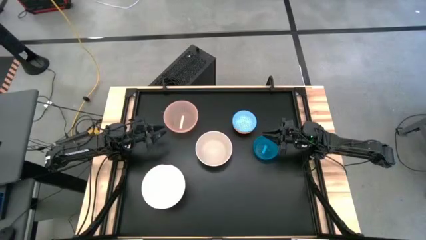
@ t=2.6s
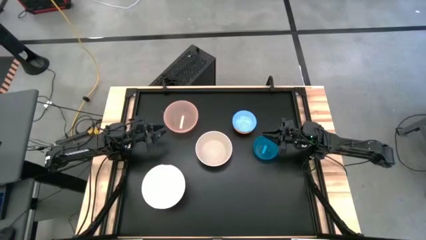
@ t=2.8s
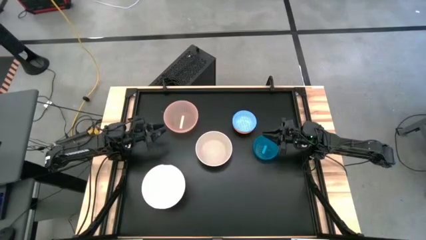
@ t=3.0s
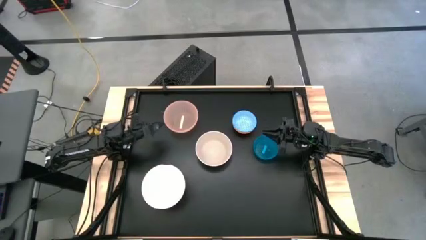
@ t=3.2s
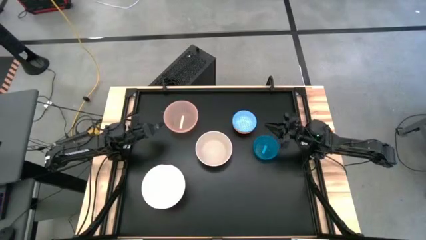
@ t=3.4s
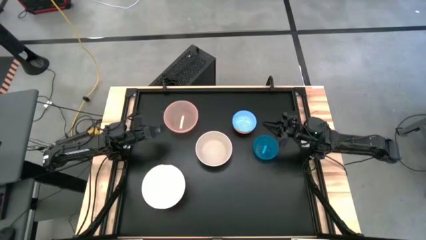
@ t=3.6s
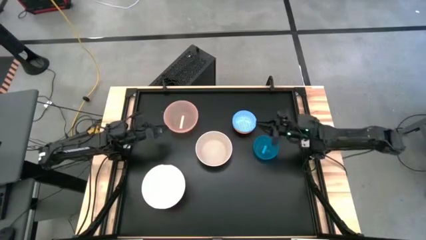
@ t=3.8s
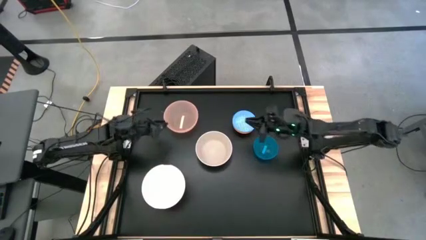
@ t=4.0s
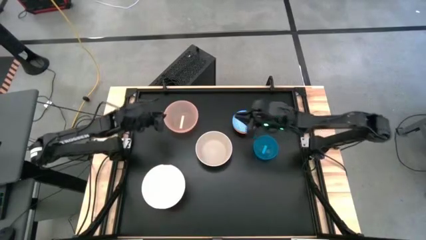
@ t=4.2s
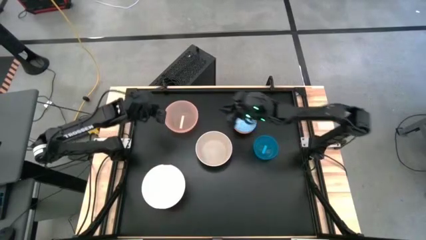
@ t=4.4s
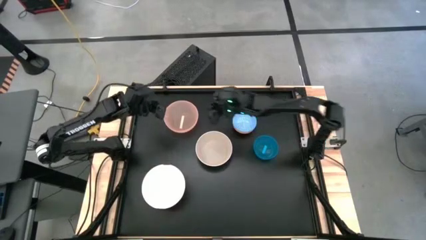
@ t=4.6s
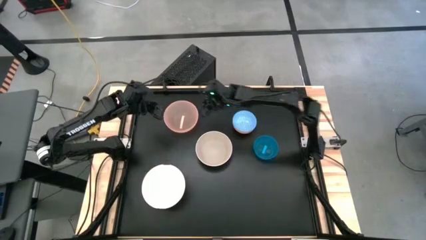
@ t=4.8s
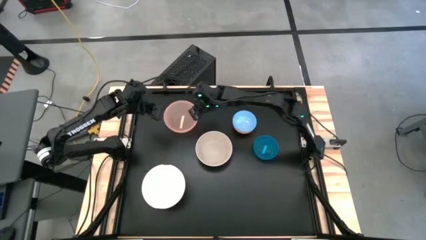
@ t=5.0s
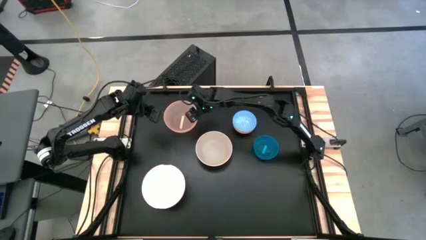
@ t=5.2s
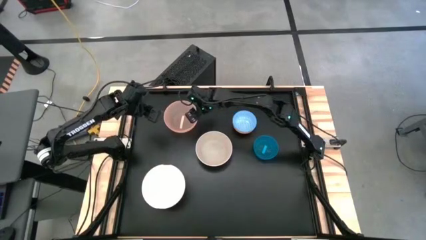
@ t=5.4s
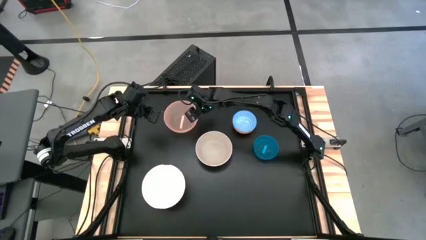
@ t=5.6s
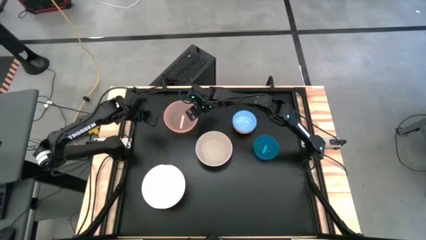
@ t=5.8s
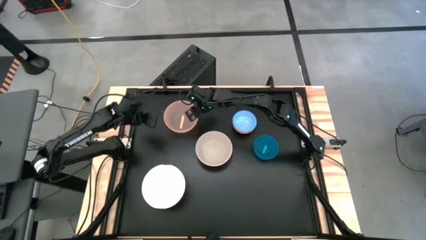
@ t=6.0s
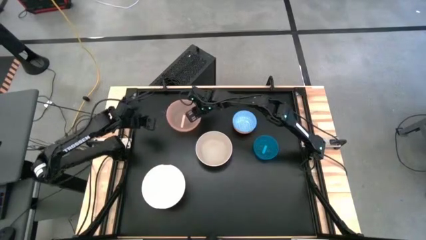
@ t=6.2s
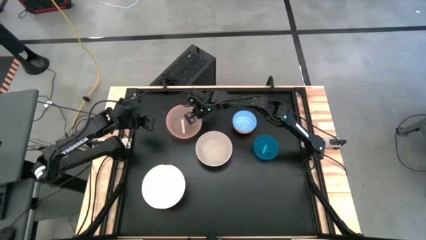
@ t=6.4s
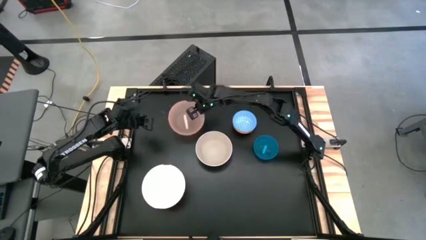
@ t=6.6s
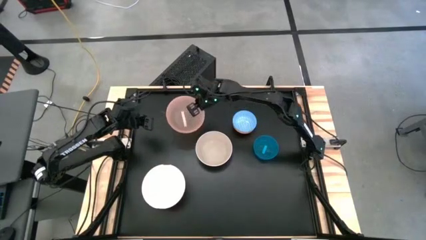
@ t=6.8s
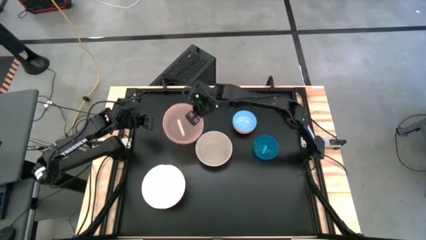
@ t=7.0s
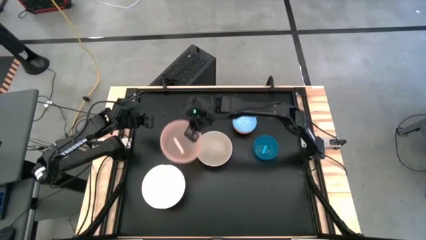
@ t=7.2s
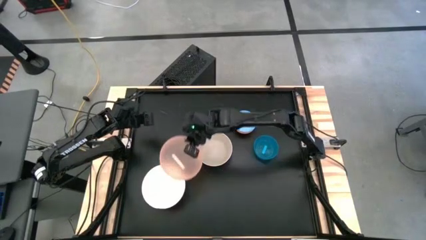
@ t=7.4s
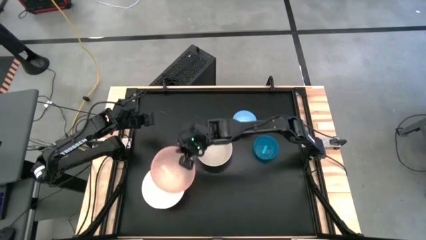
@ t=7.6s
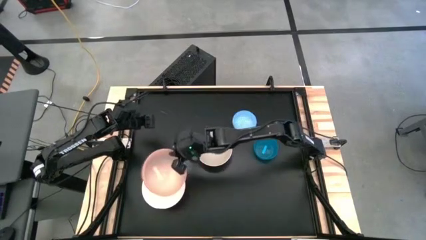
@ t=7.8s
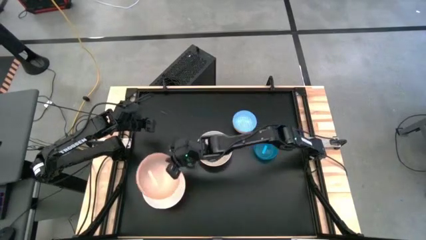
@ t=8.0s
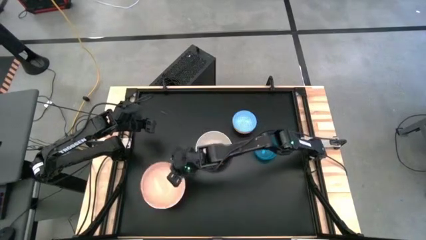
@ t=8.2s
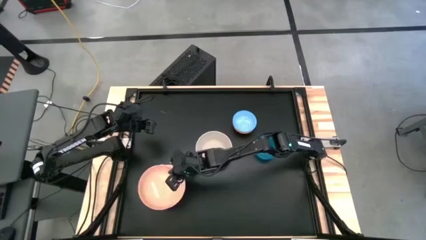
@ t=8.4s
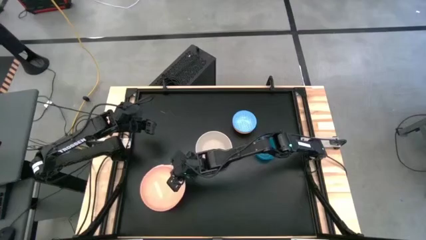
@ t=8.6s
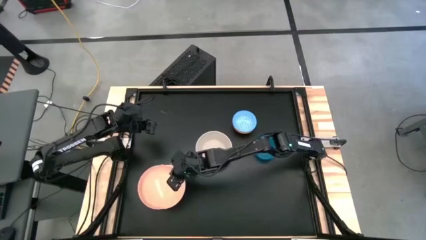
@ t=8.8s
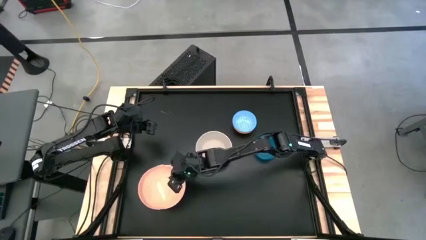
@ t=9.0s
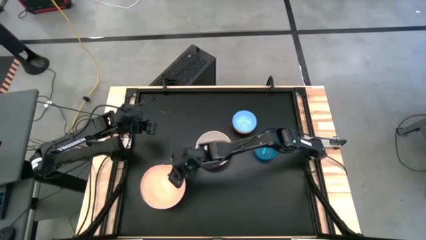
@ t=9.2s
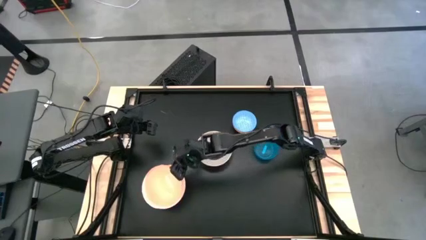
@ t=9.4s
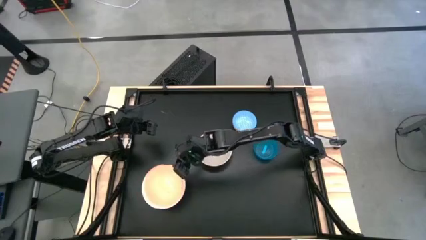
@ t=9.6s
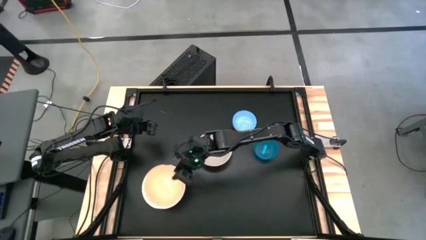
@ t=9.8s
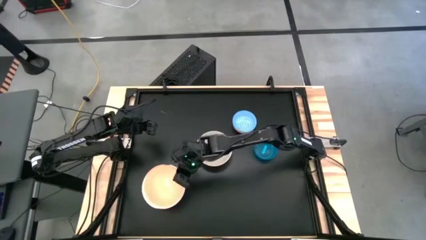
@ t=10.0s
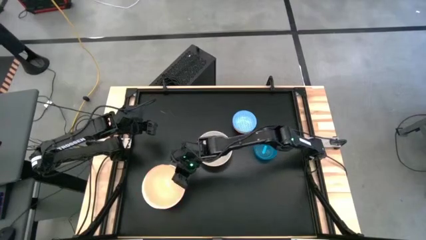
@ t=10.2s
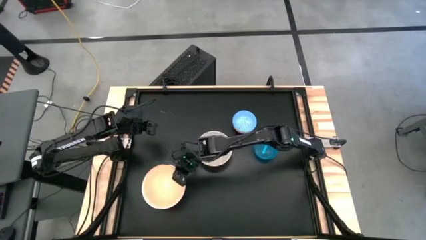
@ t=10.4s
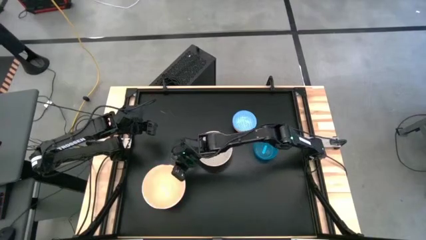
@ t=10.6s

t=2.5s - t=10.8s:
Stack the light orange bowl on top of the left white bowl

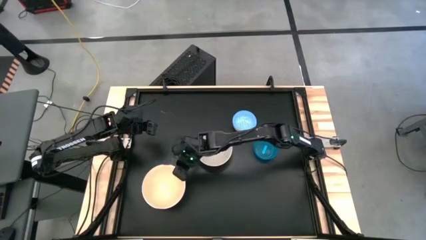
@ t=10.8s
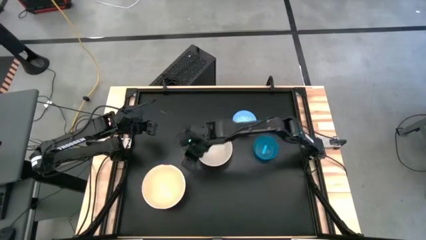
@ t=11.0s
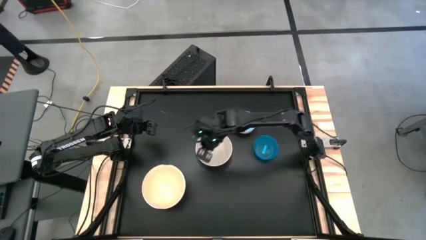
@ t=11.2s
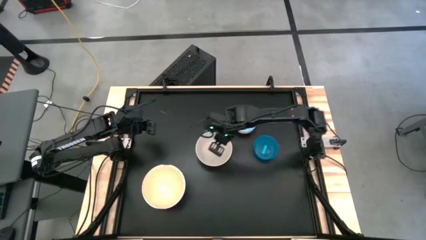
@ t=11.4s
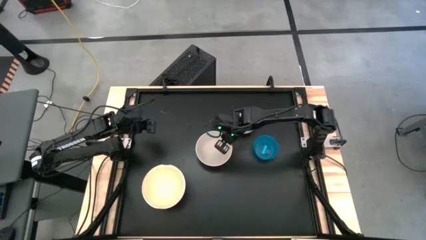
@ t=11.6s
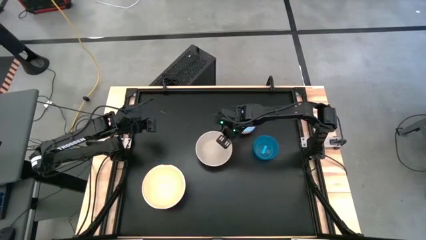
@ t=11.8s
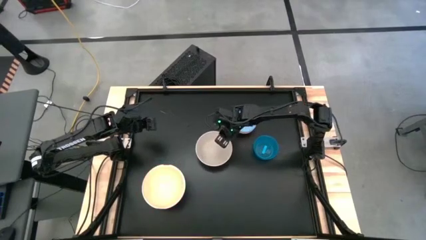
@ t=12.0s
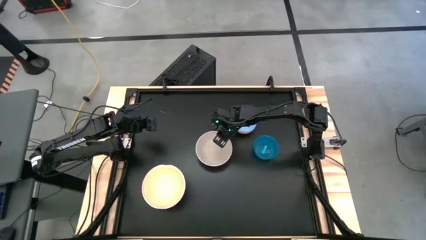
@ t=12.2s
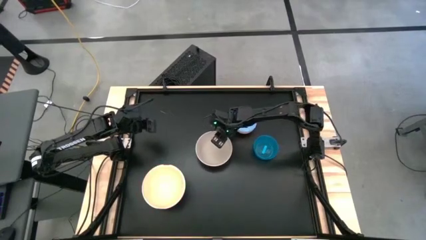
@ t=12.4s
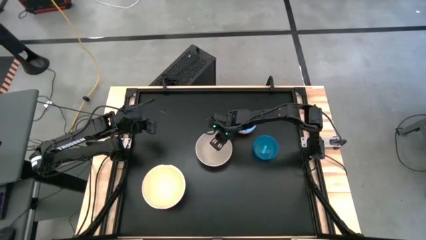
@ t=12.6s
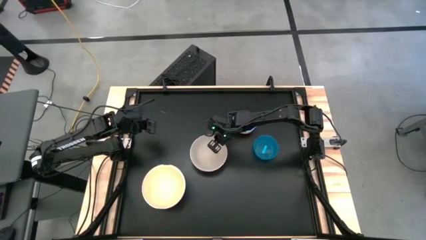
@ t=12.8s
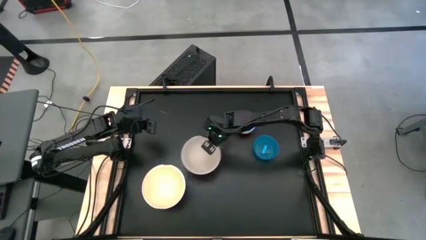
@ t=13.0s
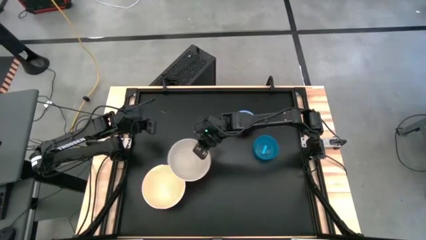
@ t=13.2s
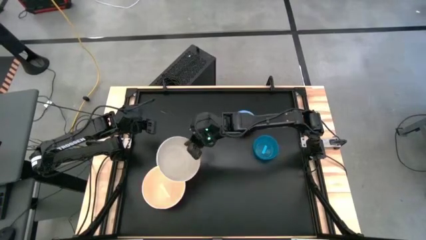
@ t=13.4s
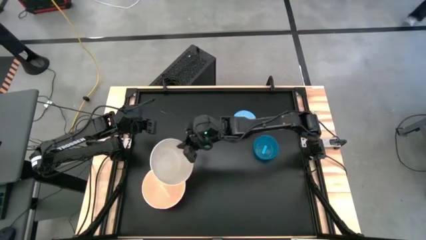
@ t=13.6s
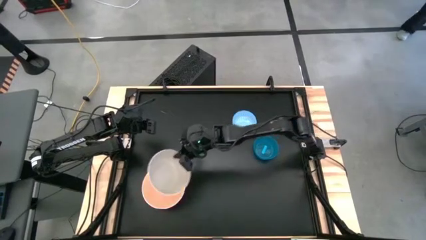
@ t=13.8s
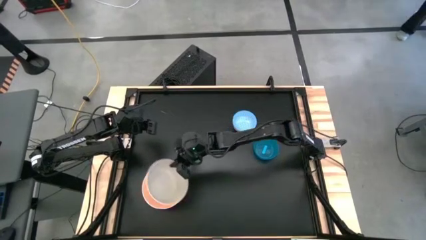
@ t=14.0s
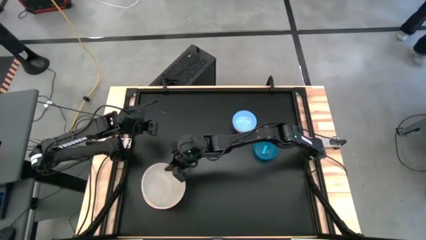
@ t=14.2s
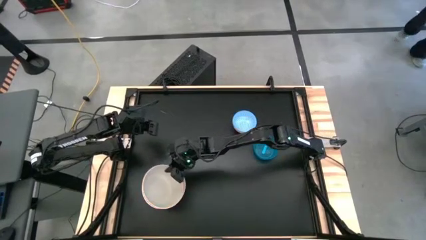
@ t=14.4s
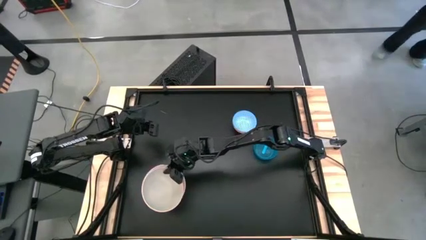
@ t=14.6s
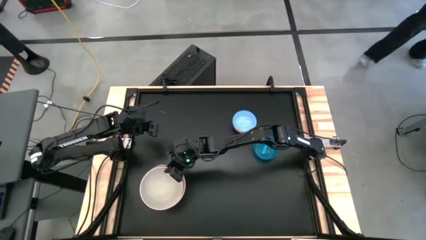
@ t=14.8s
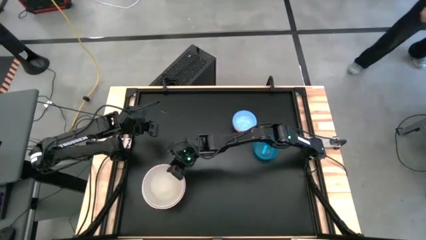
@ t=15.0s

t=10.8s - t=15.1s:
Stack the white bowl on top of the light orange bowl

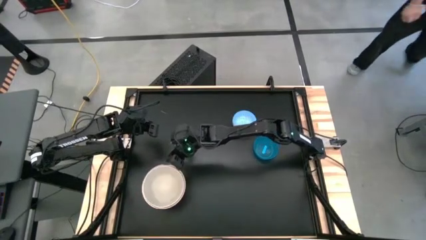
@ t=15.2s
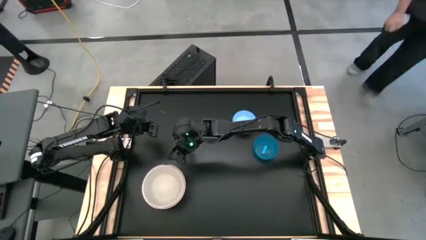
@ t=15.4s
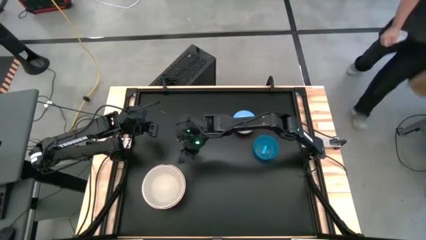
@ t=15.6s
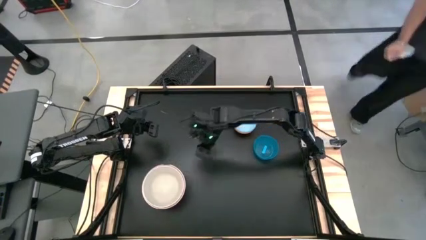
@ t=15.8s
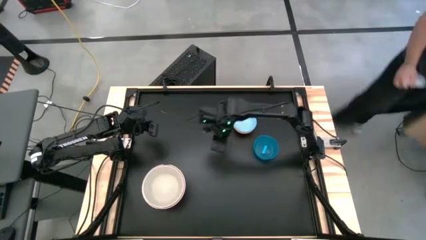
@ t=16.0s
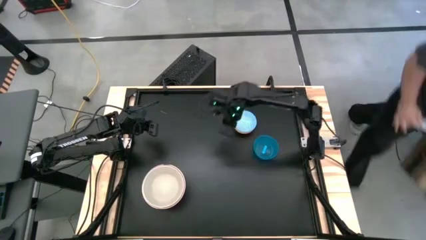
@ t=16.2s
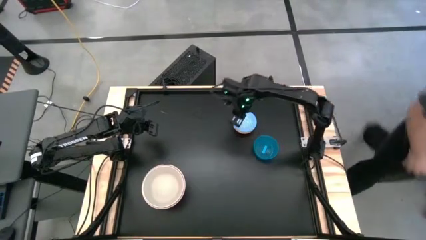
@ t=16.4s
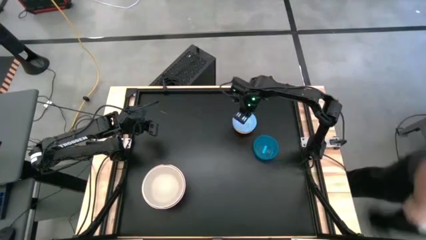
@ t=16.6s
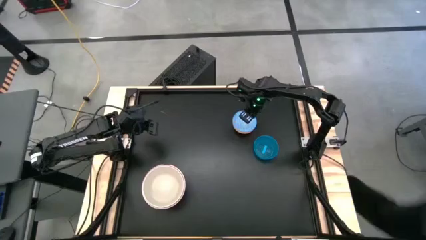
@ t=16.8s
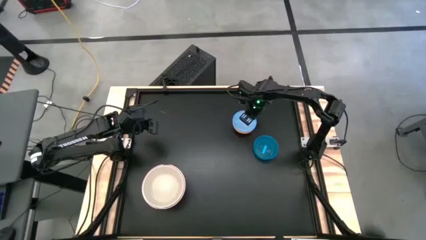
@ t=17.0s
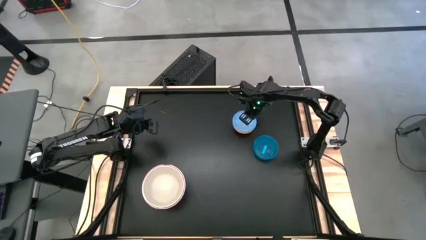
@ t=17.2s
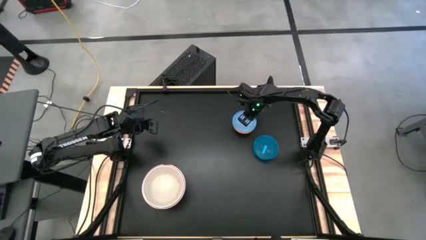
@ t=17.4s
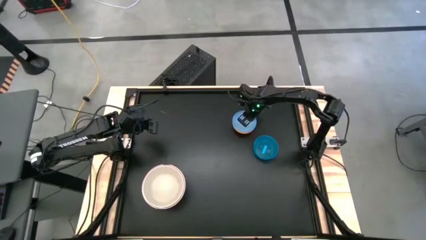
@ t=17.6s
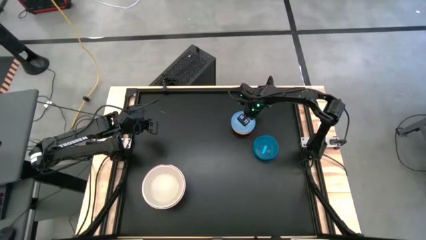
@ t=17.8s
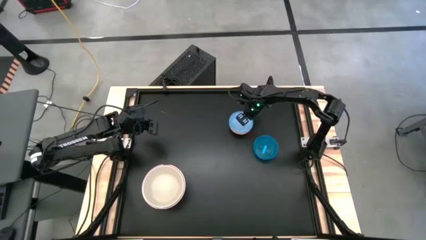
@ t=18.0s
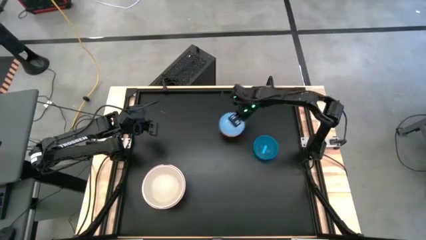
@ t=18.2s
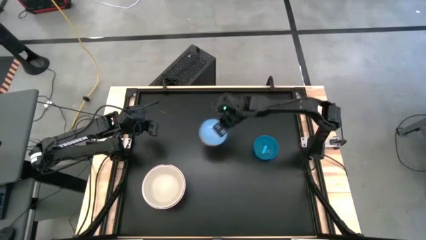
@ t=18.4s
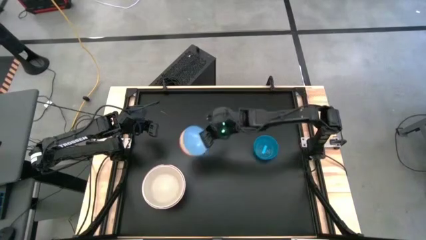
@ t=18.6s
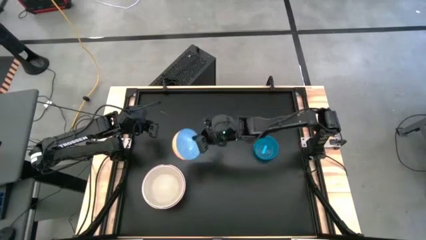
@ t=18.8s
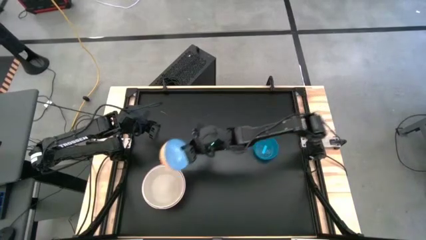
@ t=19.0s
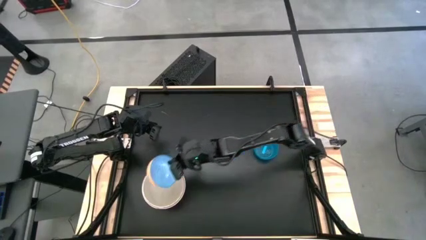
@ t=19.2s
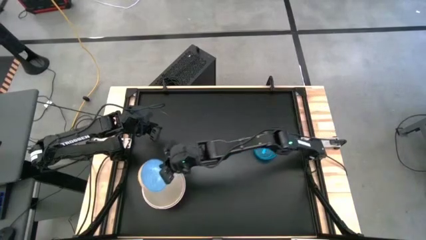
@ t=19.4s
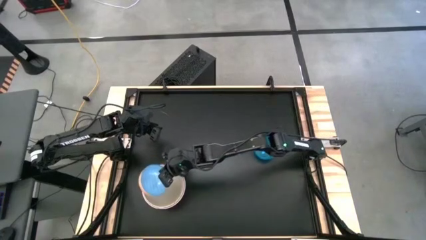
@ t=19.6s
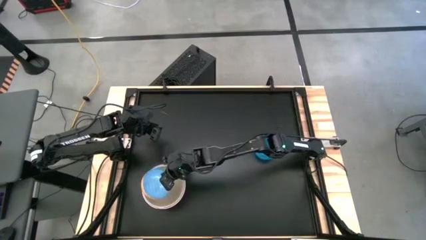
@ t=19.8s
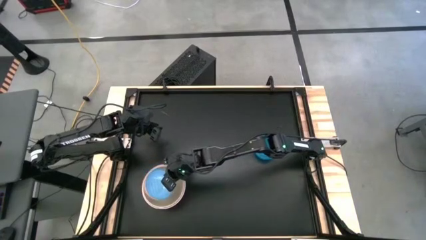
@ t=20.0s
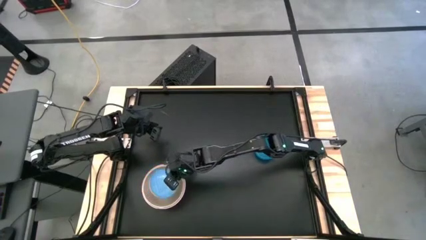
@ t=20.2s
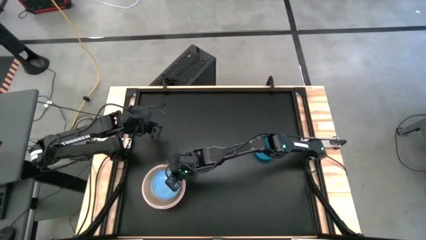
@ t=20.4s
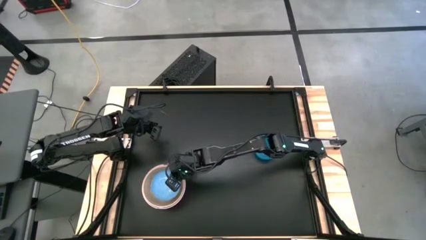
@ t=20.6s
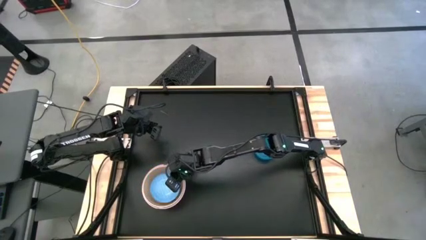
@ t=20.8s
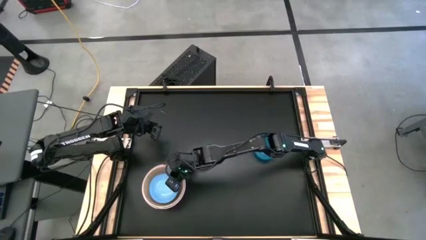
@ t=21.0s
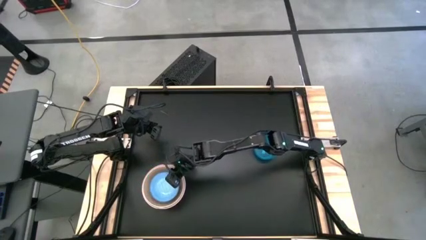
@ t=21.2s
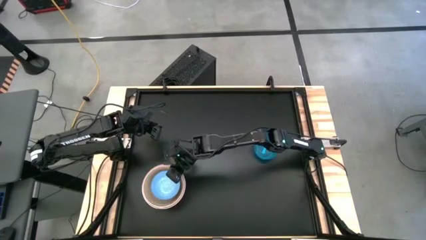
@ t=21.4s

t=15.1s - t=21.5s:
Stack the blue patterned bowl on top of the white bowl
